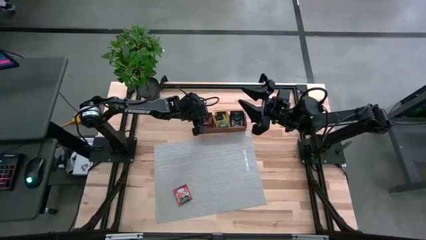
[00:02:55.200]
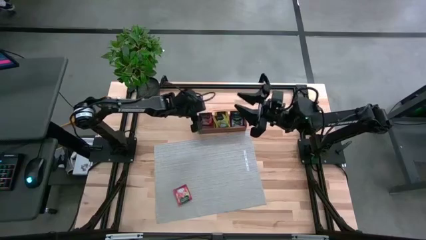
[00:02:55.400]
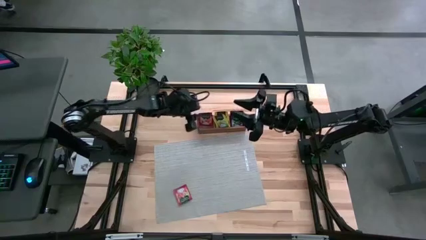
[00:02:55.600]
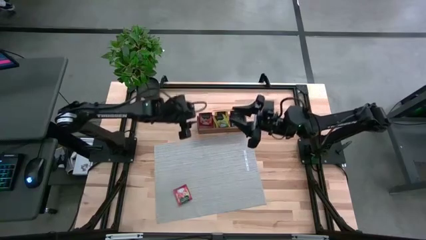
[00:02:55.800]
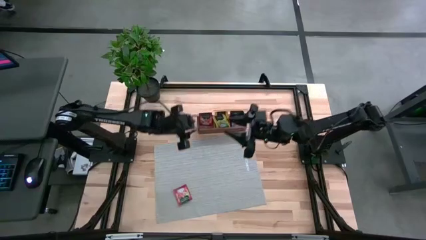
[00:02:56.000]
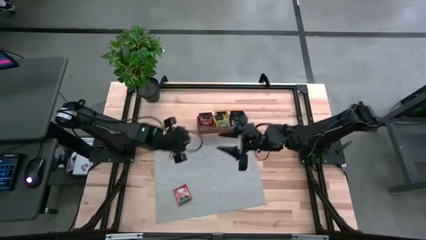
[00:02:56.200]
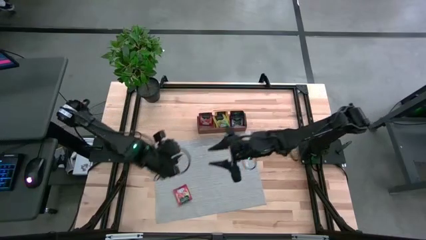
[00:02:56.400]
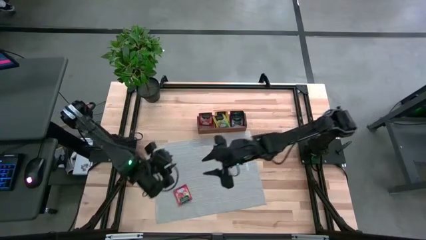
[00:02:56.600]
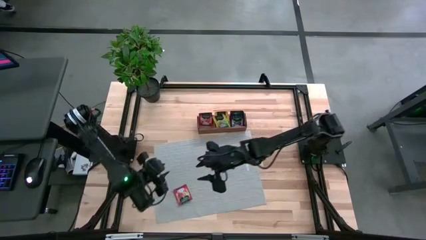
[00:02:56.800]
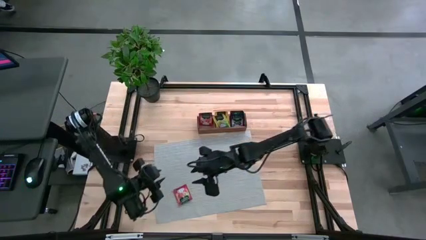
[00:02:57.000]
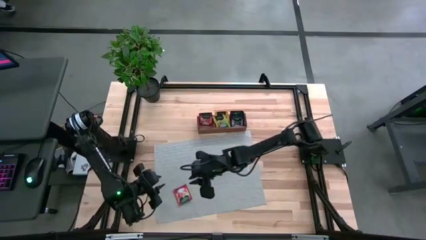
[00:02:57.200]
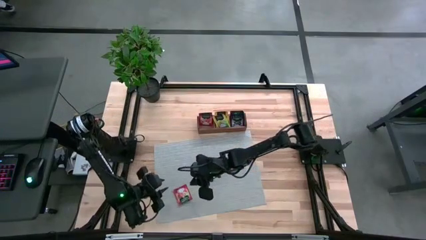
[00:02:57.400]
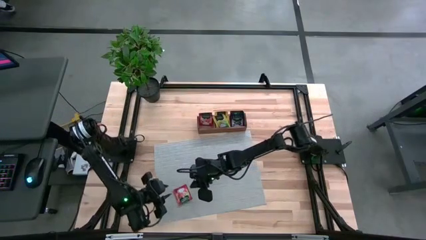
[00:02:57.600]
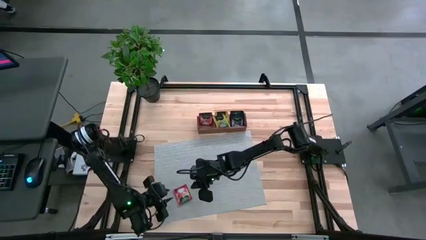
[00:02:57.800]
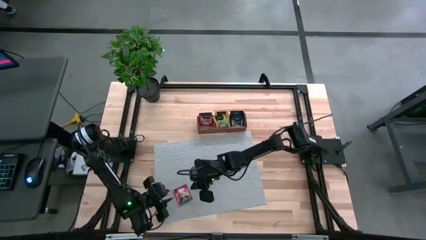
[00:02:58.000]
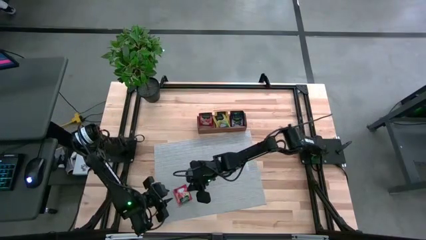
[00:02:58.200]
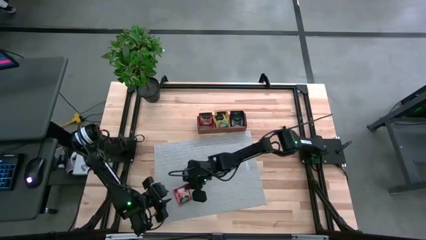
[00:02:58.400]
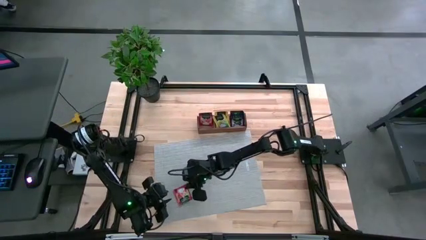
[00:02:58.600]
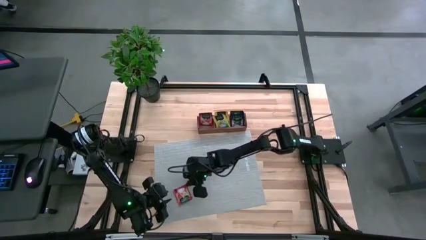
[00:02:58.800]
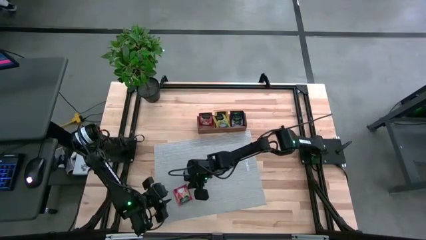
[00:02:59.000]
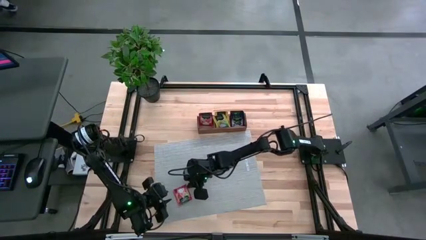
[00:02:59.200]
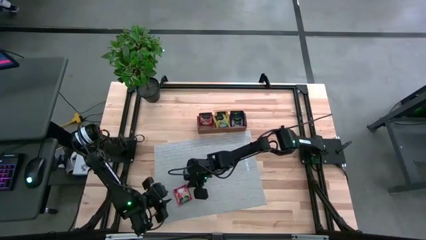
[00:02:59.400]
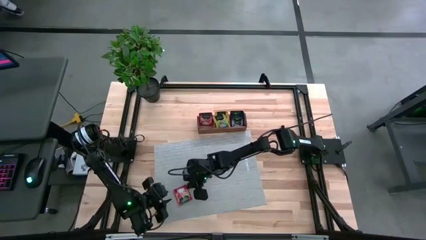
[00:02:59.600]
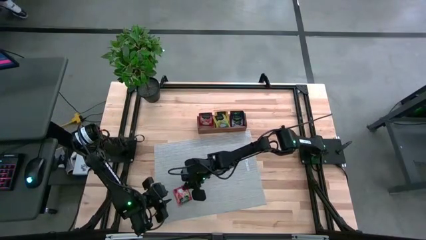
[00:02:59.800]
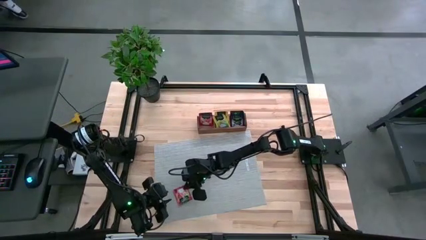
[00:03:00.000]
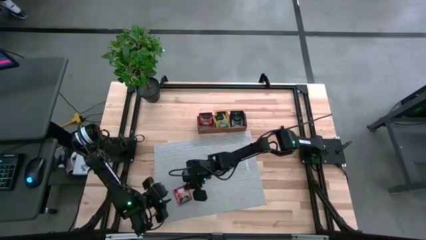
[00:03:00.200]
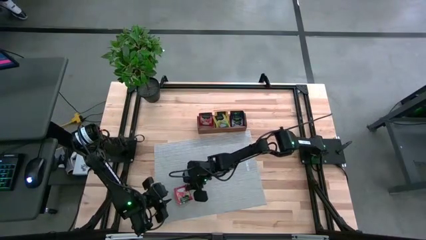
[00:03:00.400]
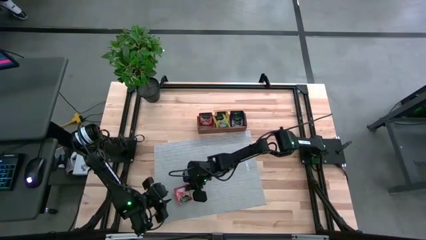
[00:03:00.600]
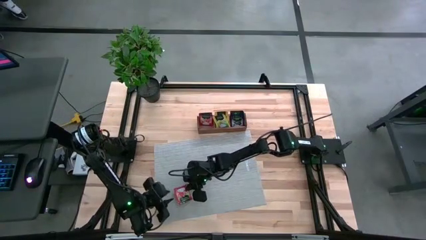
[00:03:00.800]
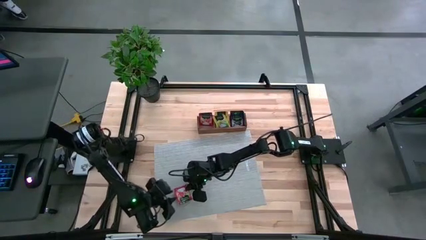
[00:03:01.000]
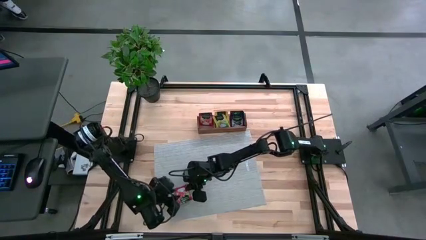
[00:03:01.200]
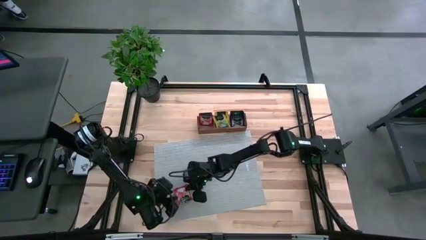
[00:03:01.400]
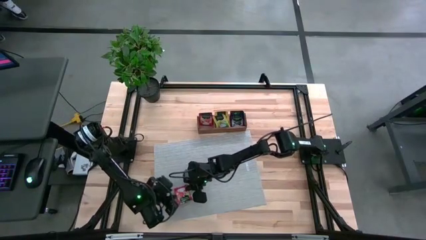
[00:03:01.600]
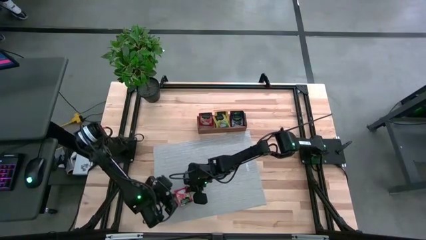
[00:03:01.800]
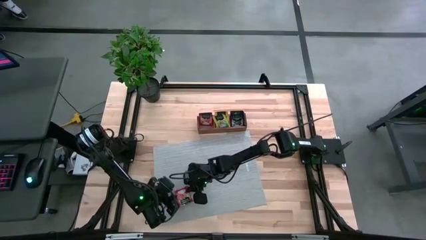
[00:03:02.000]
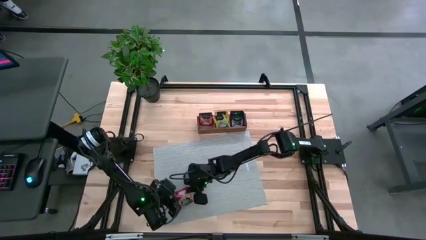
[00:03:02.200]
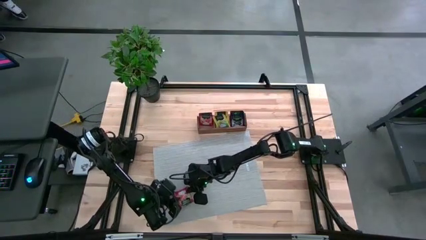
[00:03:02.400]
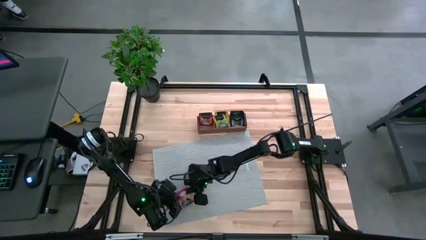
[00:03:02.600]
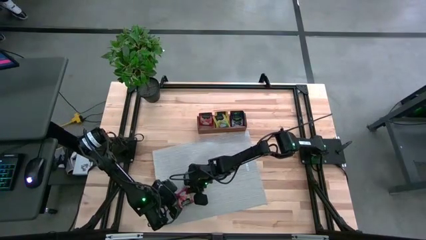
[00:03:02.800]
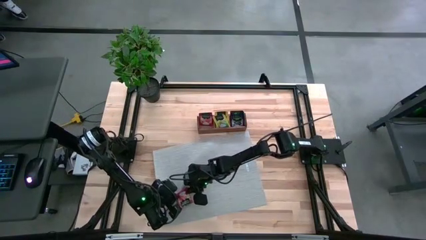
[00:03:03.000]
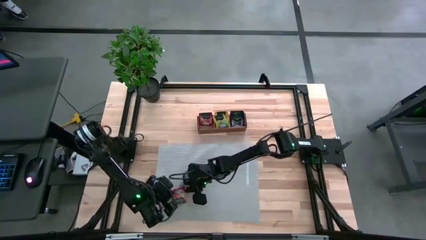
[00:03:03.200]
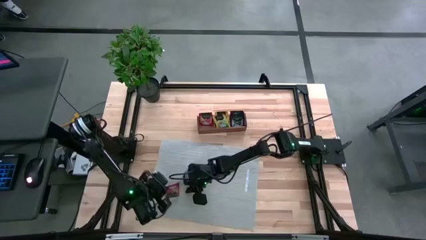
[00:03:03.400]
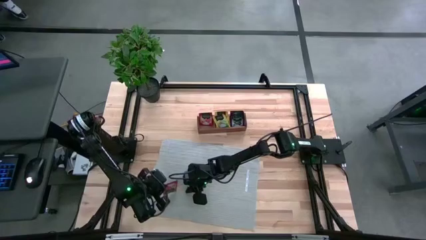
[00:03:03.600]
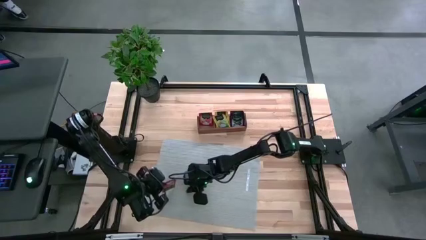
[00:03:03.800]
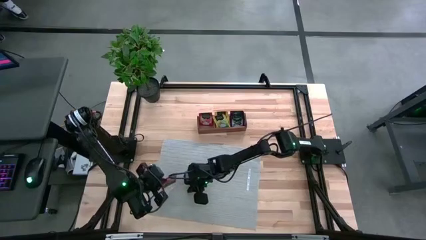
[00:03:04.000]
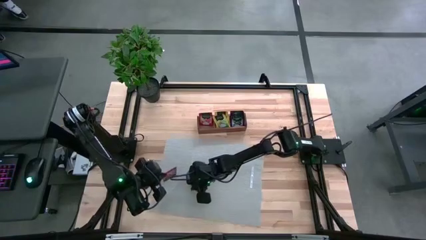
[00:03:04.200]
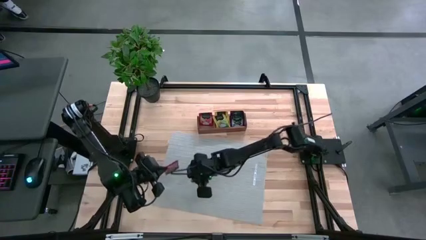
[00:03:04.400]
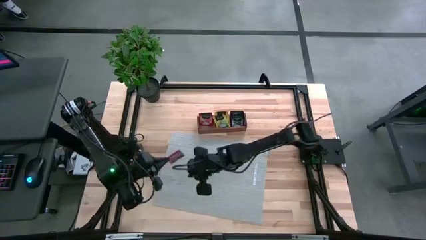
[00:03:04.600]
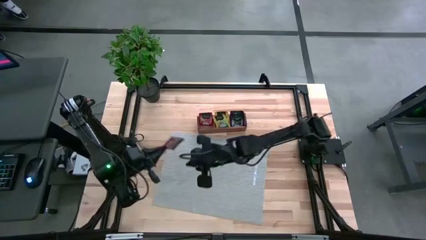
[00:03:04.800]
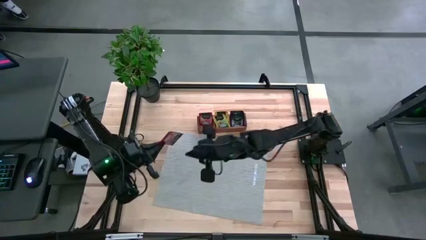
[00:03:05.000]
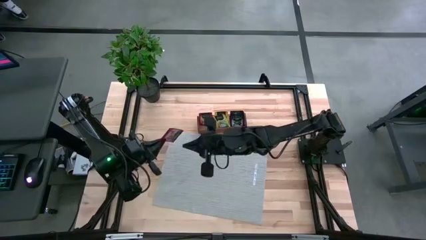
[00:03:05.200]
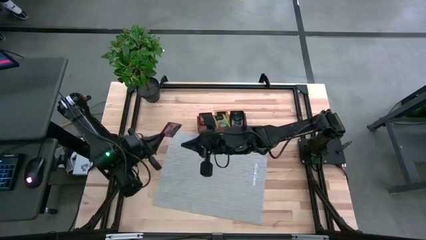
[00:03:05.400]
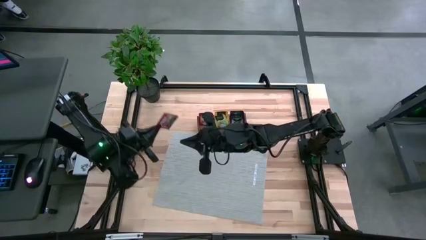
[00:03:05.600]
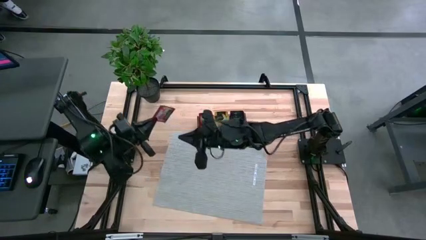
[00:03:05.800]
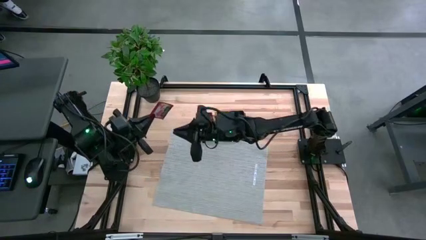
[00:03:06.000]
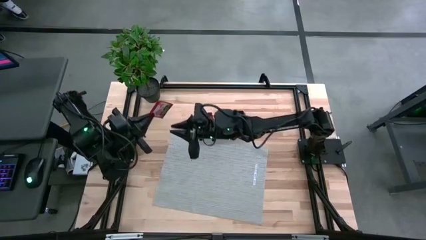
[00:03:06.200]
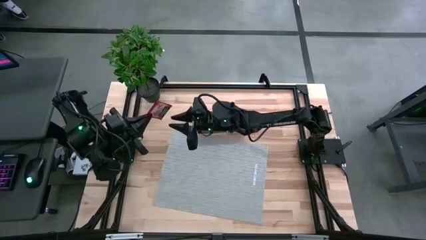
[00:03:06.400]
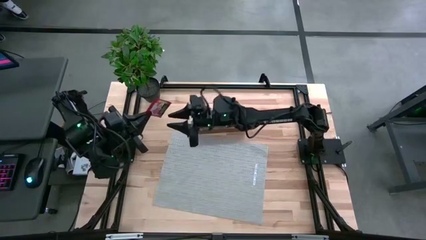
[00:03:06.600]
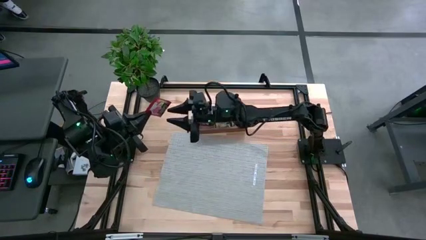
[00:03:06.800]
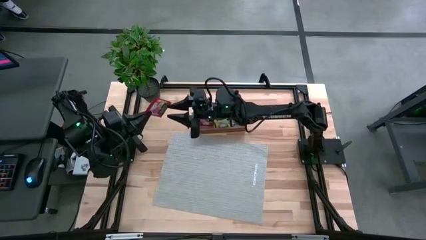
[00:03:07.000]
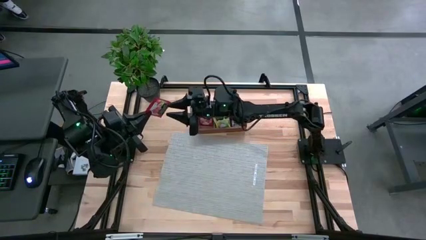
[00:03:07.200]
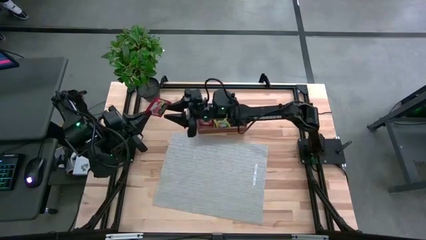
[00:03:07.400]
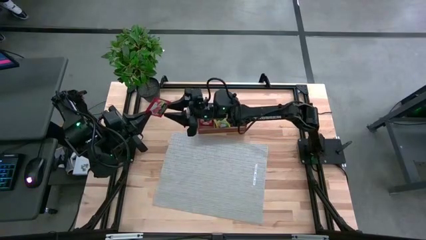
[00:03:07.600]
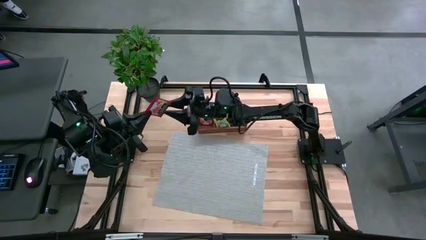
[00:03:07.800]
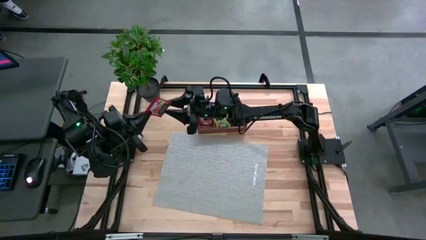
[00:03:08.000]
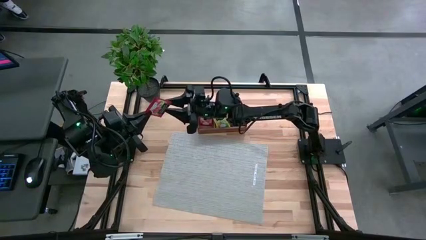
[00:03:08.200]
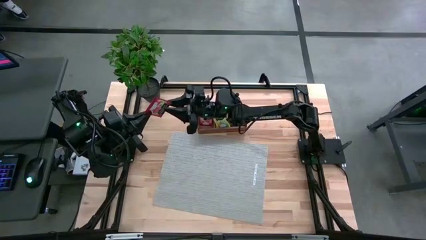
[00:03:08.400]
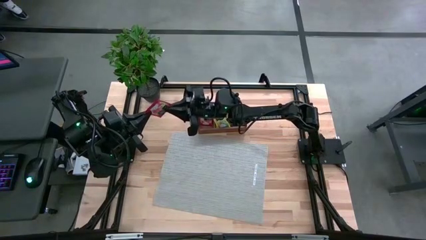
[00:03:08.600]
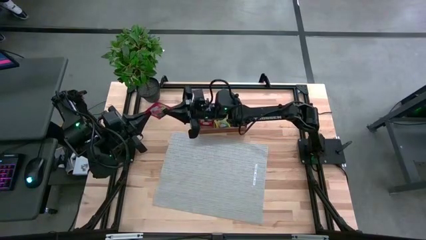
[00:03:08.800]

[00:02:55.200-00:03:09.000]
Task: Pick & Place Tea
Put the red tea bag into the left section of the wooden organizer

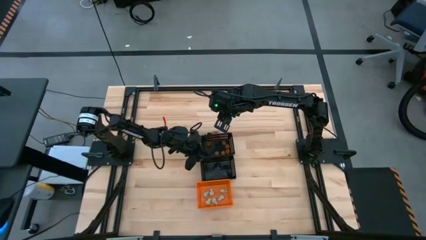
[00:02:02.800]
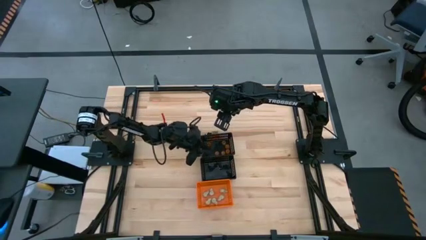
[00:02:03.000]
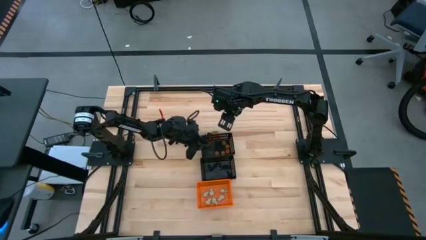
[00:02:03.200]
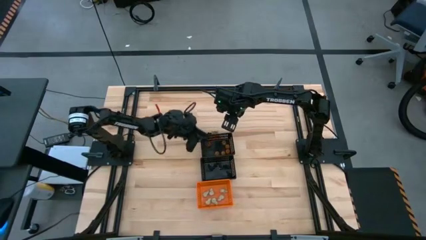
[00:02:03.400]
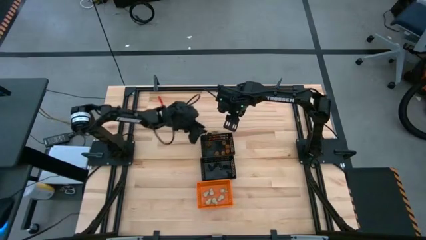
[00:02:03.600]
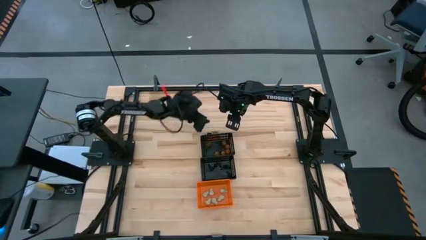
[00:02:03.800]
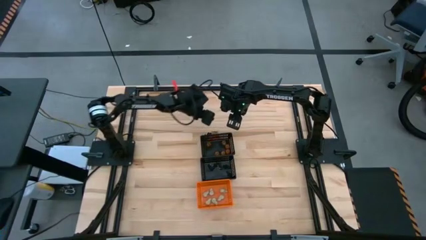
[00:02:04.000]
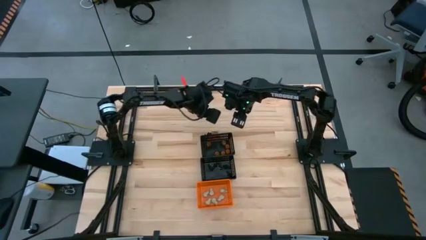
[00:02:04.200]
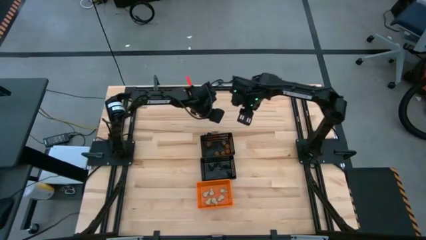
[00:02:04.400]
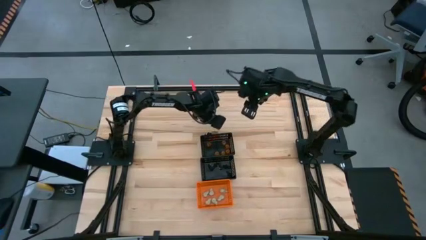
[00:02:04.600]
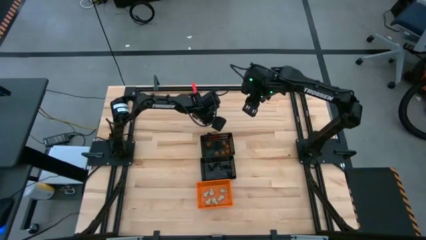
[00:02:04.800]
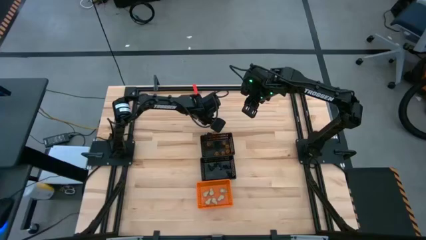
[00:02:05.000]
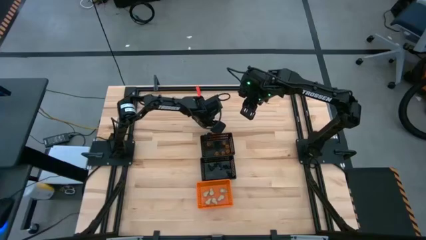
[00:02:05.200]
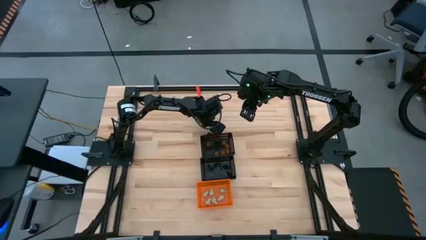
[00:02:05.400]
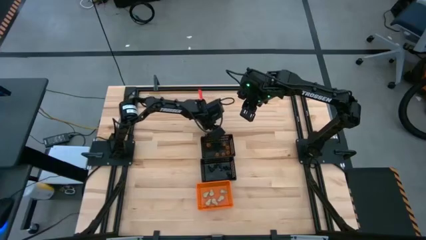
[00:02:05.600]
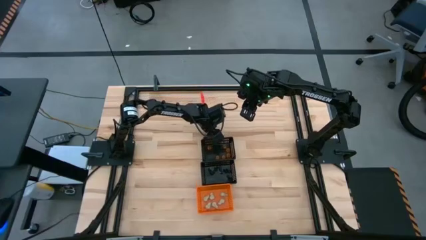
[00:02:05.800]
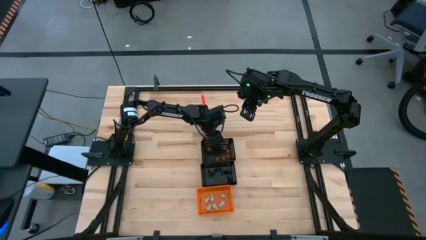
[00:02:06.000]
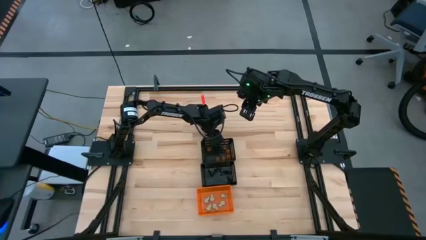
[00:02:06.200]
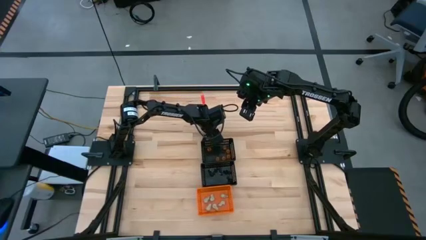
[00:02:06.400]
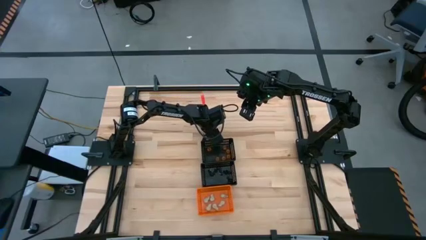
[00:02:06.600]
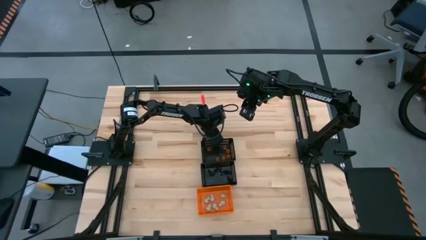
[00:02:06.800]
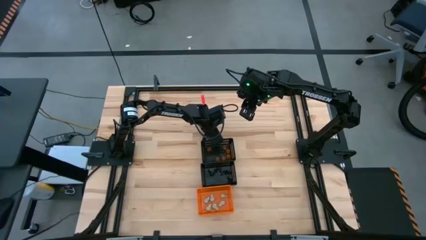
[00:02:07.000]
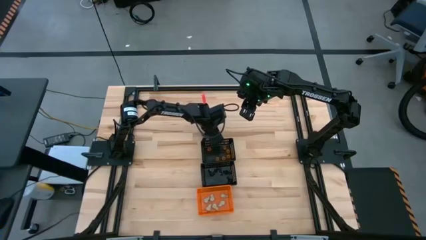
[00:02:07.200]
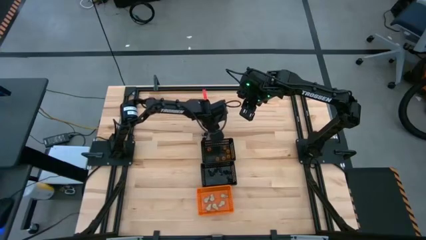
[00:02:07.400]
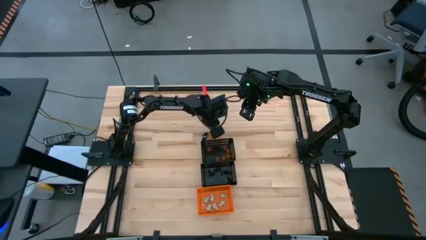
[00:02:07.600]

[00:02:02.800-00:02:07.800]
Task: Sort Halloween decoration
Put the white skull toy into the orange bin
